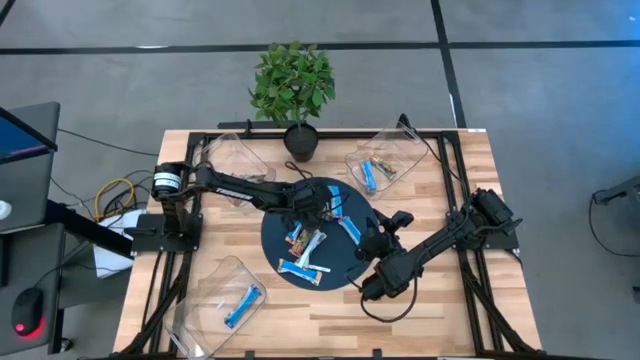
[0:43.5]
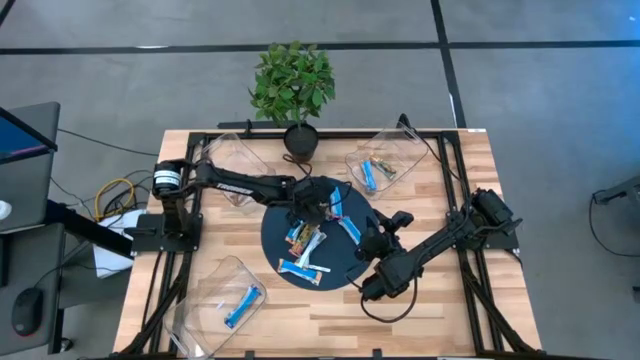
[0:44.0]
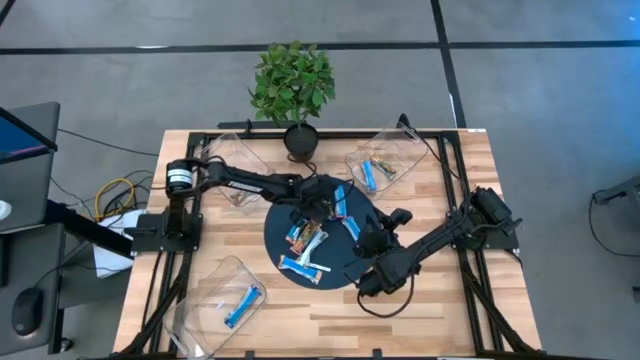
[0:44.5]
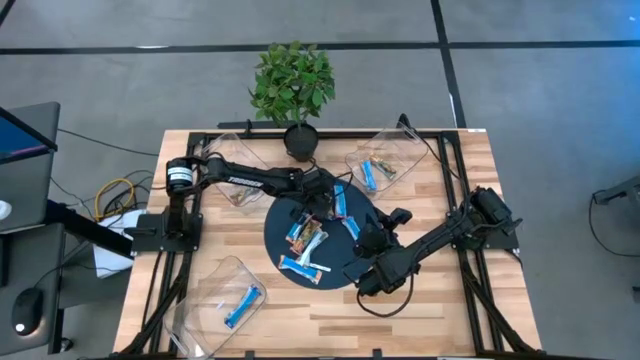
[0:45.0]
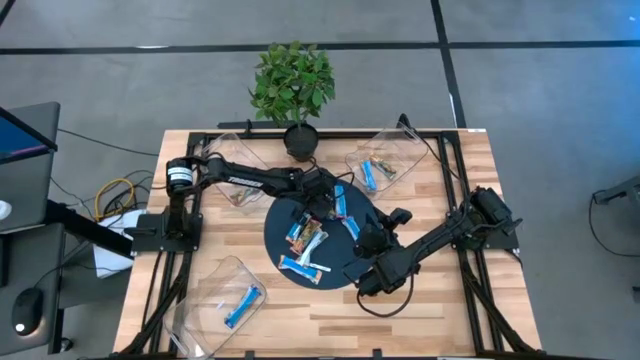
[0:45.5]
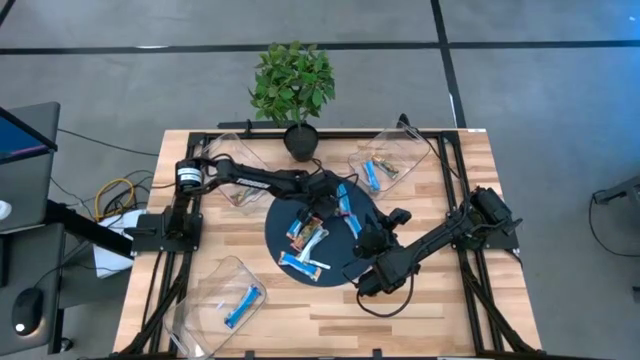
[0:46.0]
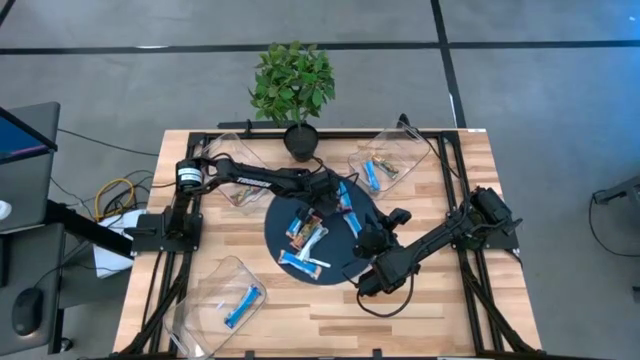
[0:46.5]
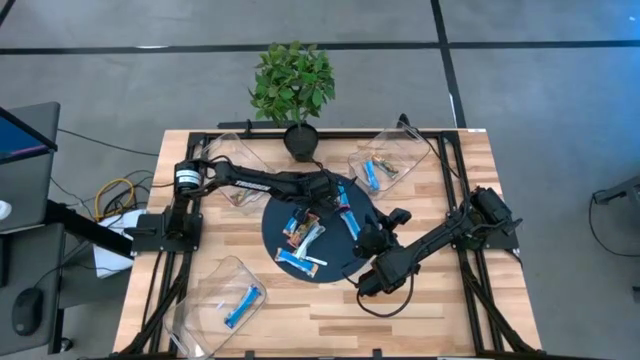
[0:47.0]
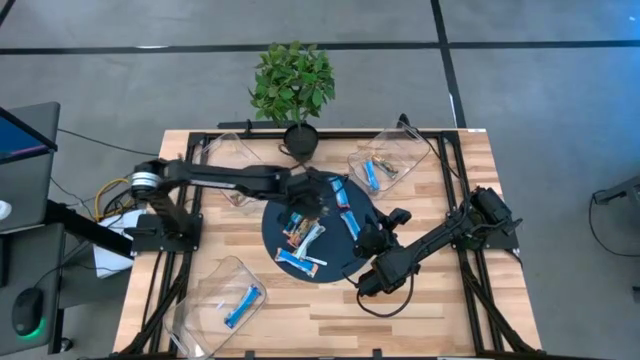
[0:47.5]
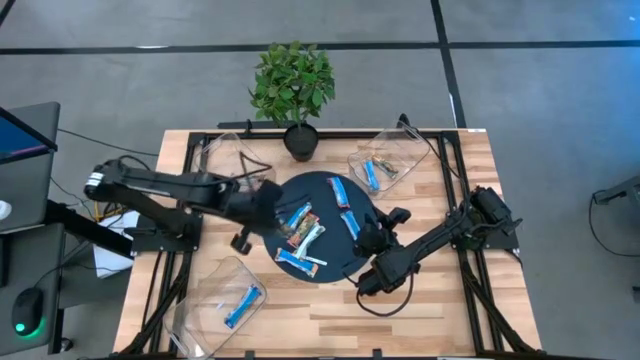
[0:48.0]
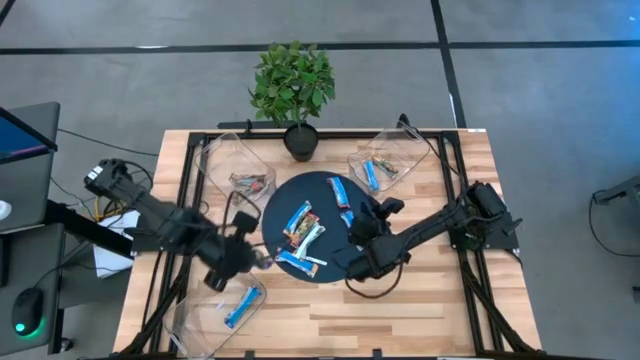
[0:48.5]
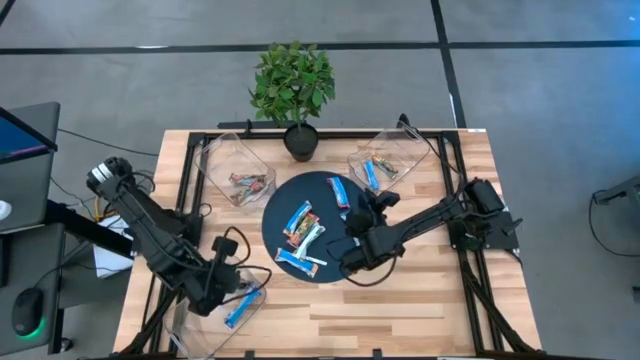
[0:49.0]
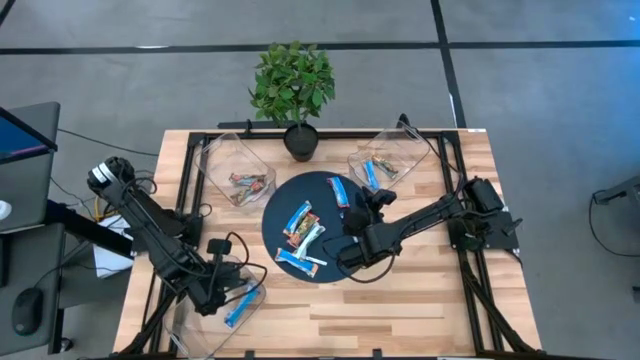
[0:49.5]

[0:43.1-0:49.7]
Task: Pick and place Granola Bars by type
Put the violet granola bar into the bottom bin

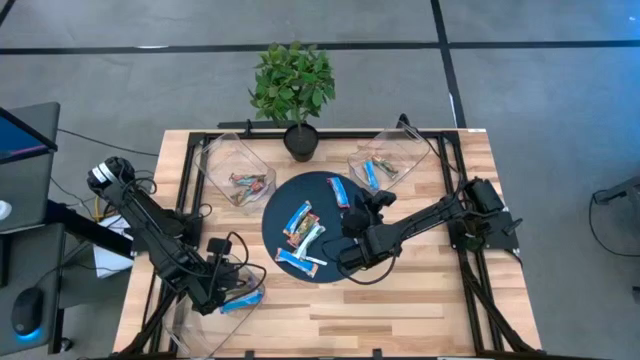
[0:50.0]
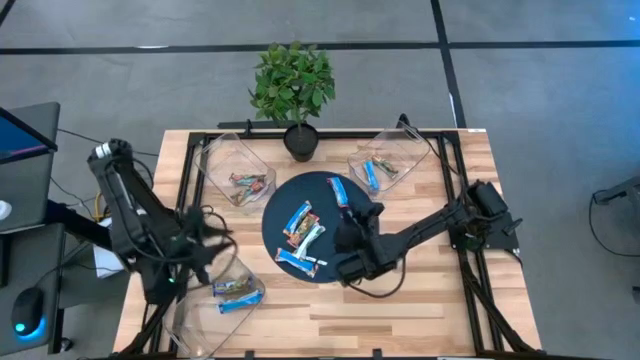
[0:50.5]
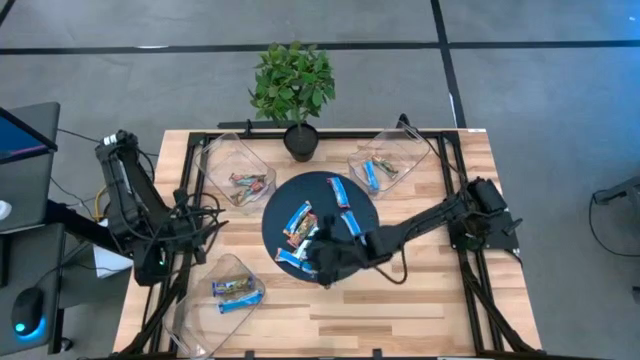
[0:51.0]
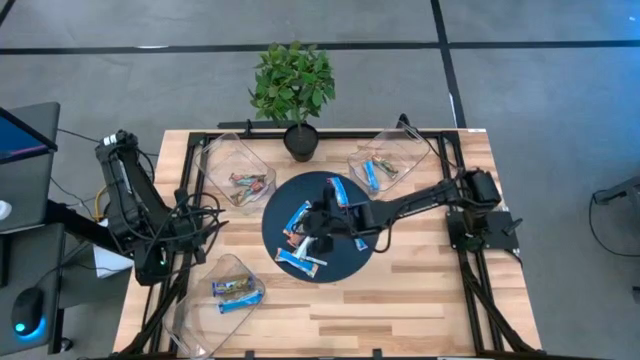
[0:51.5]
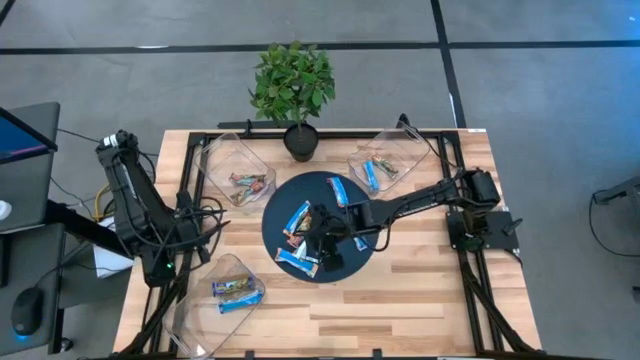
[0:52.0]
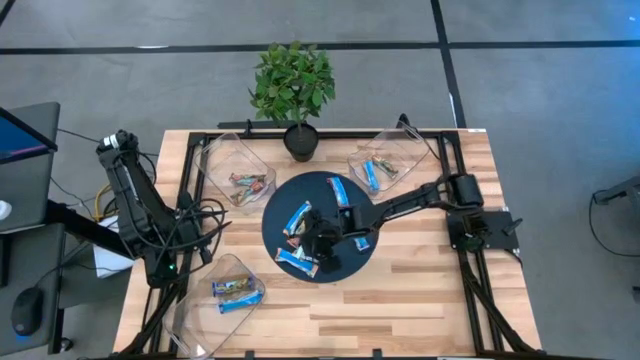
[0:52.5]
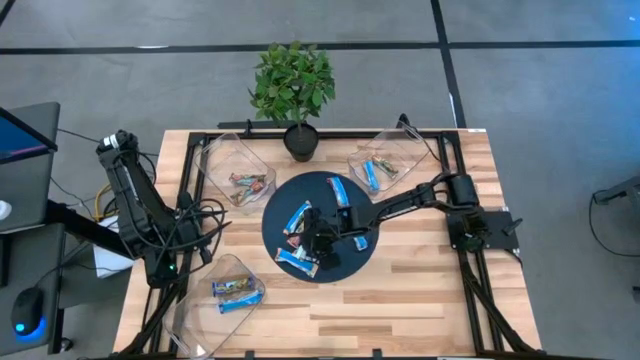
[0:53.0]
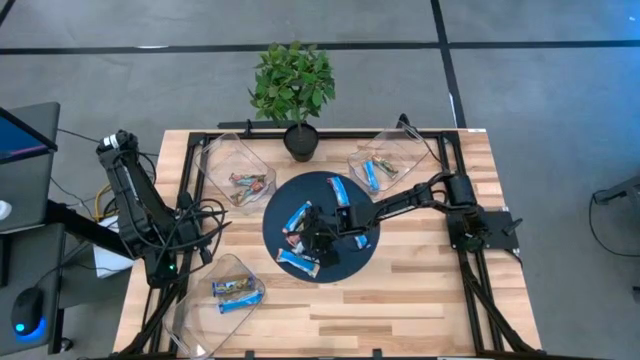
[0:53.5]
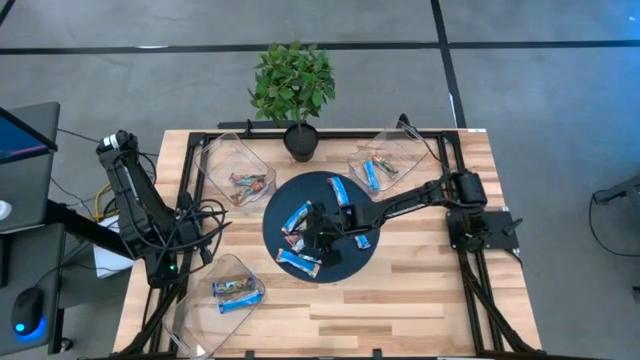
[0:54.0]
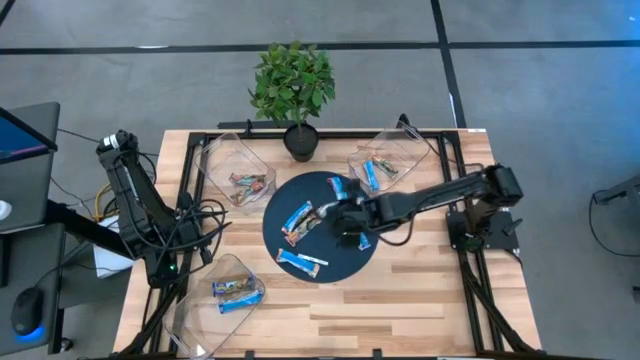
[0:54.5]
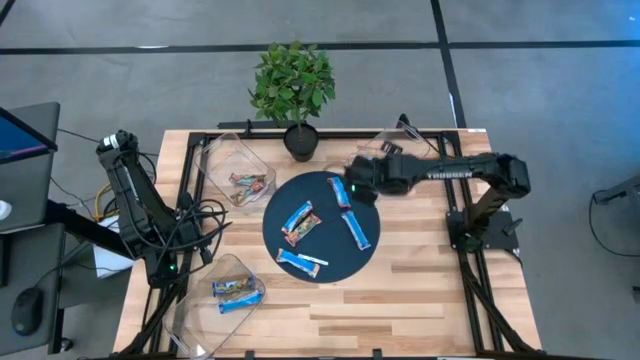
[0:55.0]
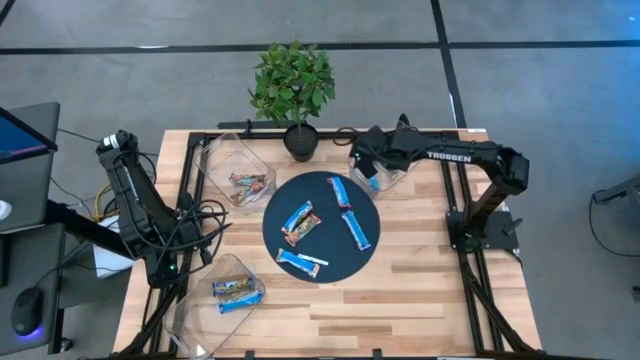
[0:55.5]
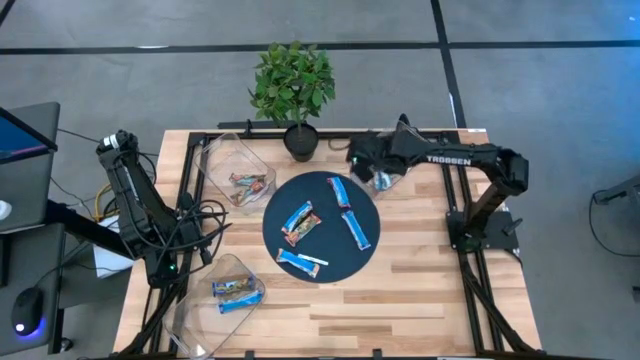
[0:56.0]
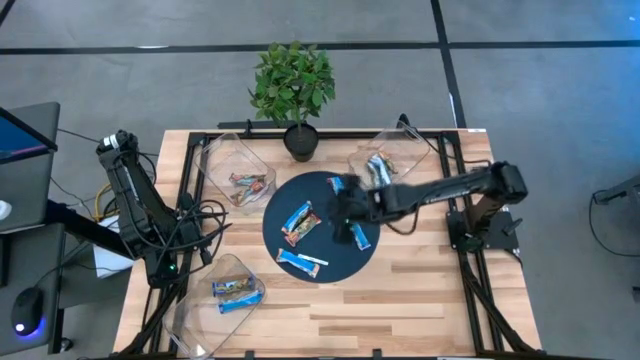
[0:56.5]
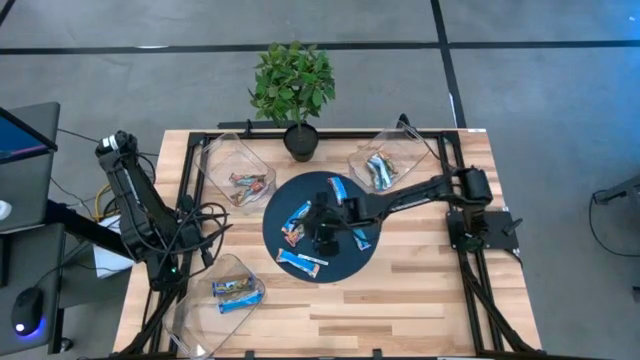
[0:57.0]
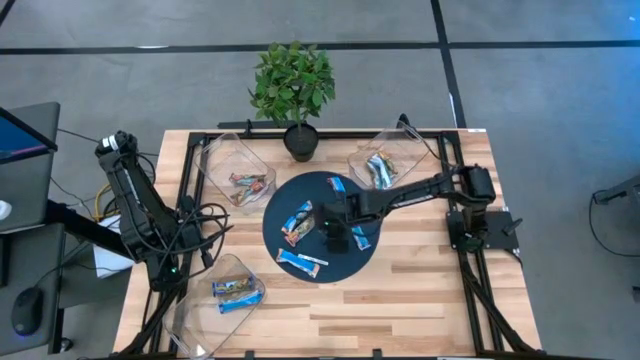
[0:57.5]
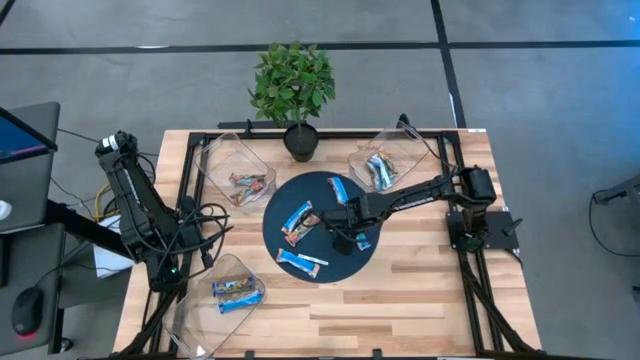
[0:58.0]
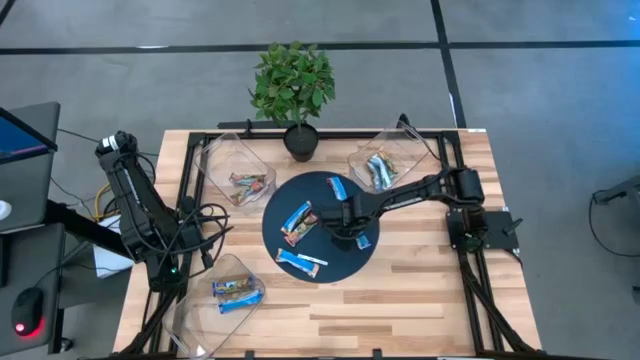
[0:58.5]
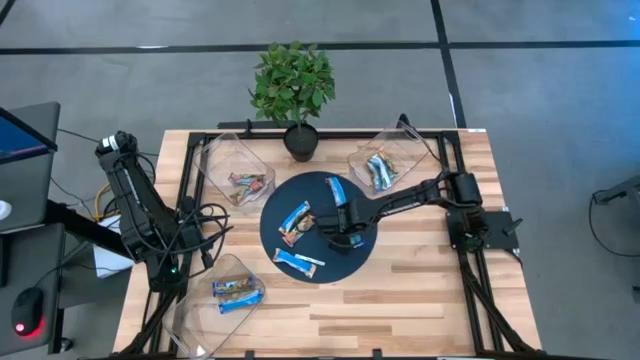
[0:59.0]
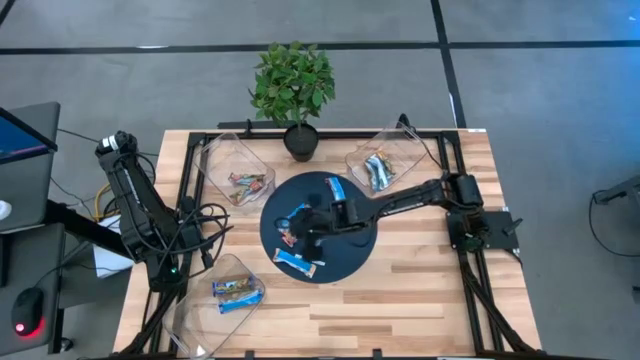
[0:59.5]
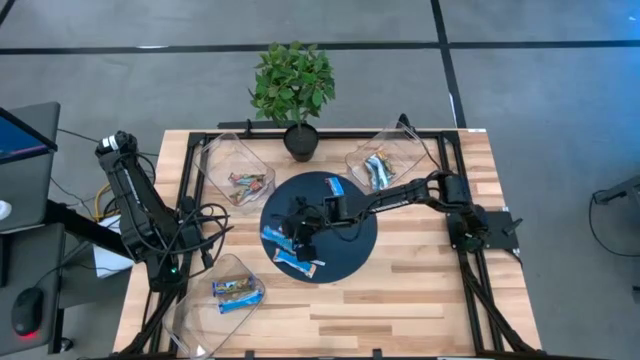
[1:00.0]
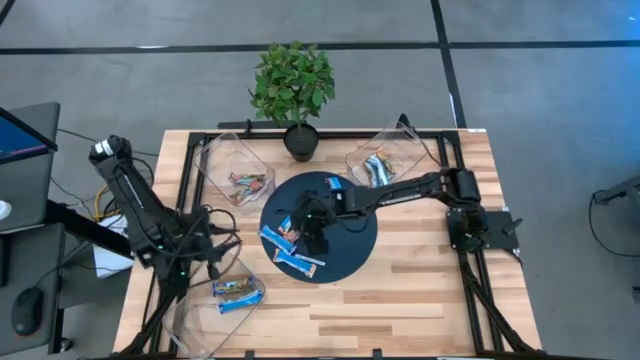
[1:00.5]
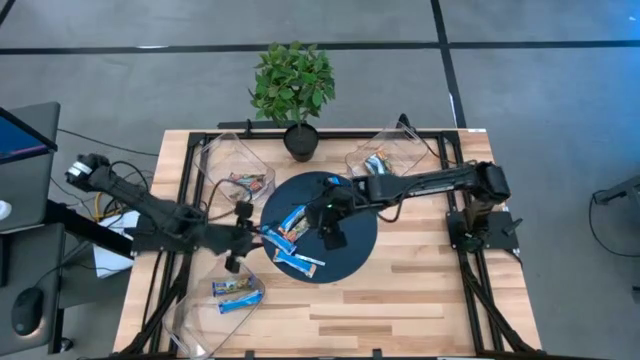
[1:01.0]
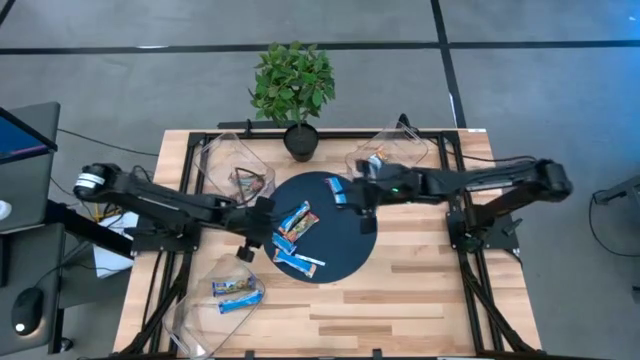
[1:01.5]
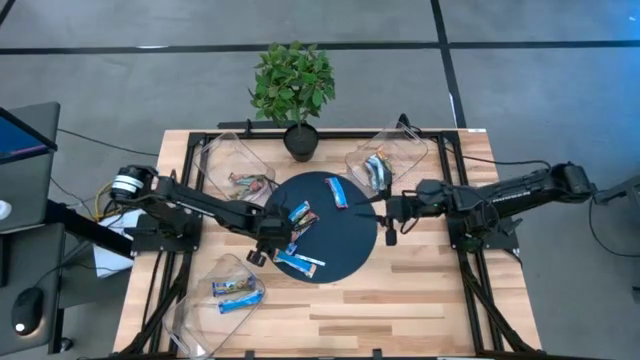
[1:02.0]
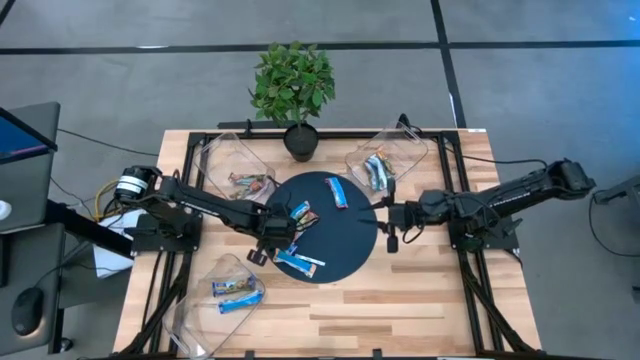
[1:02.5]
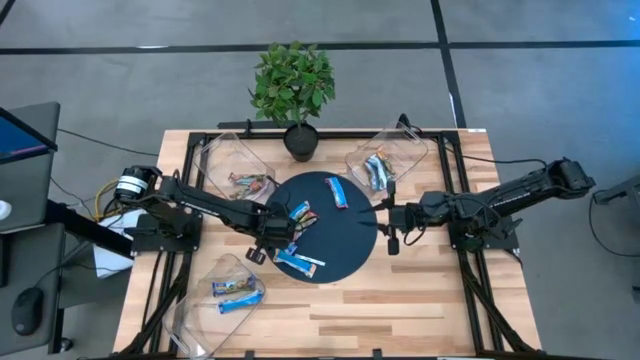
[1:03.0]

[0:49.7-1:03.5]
Put the yellow granola bar into the top right bin

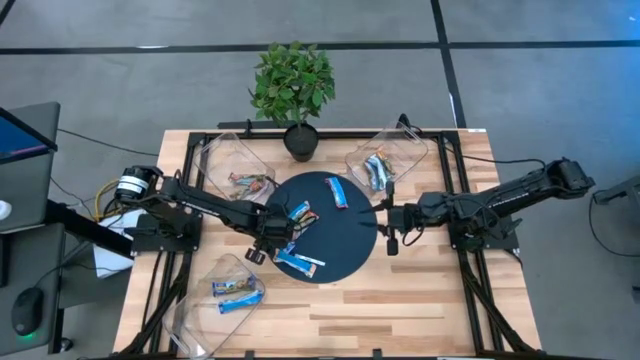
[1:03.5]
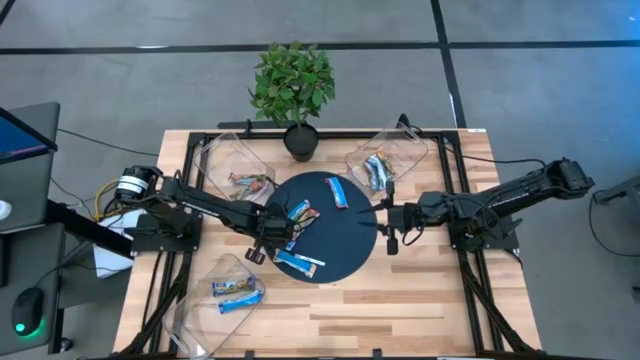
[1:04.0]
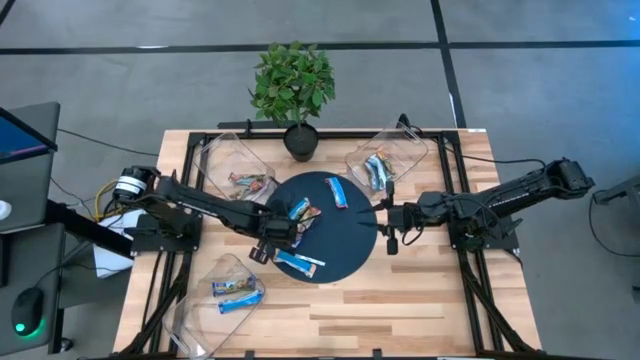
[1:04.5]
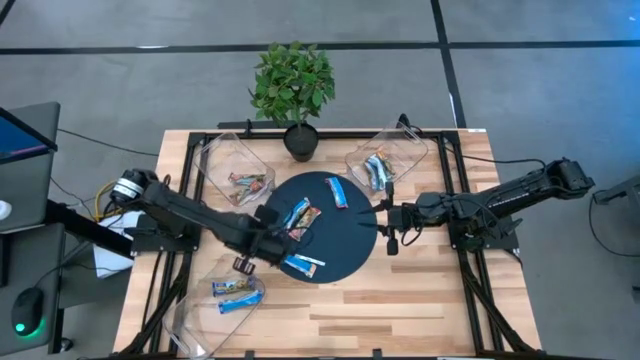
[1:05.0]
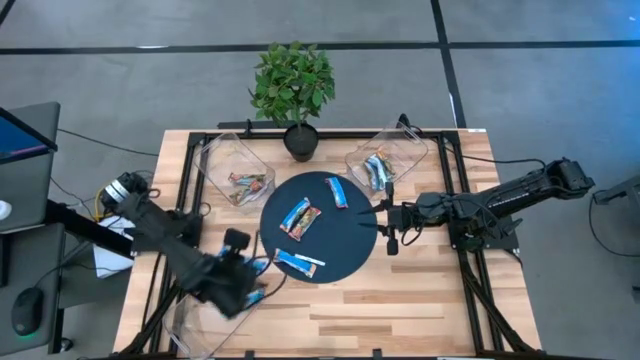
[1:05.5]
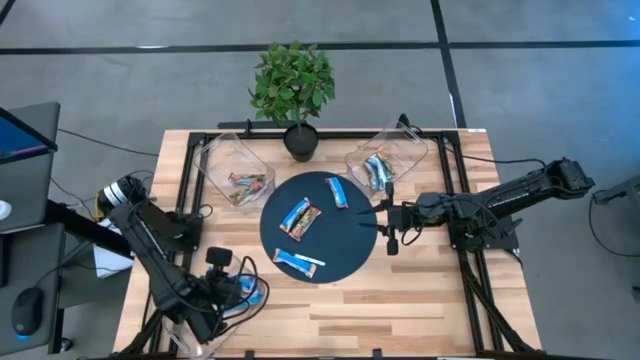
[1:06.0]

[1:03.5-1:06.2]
Put the violet granola bar into the bottom bin
